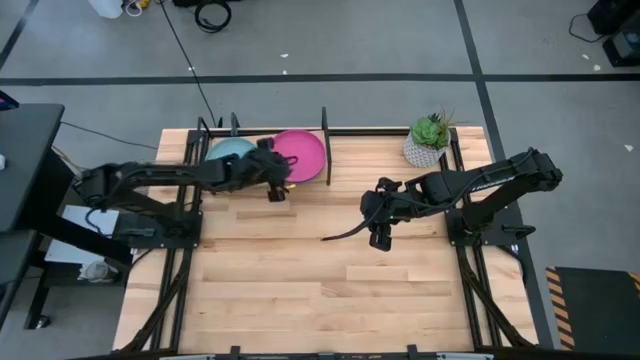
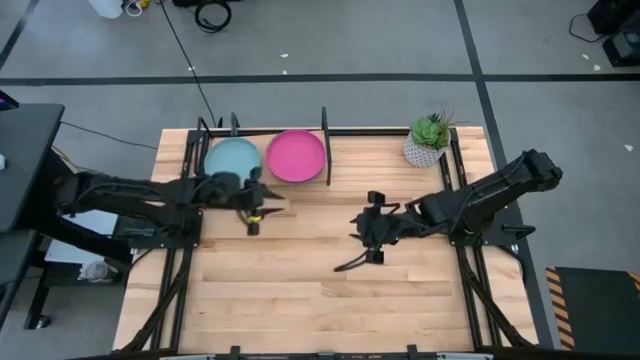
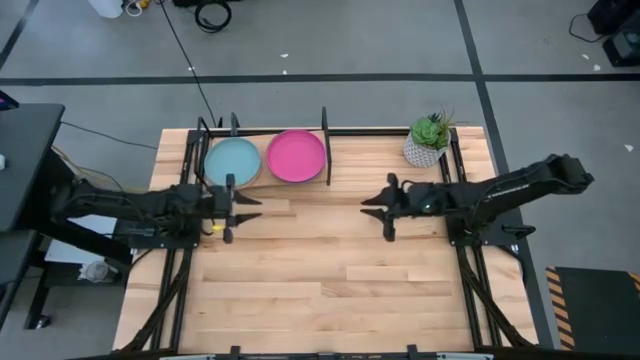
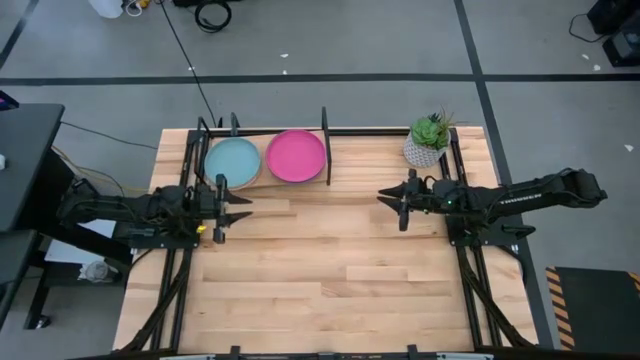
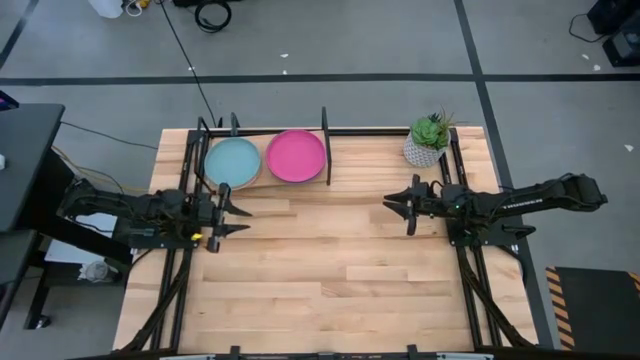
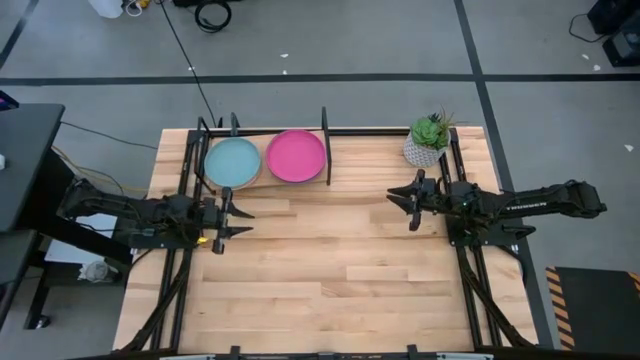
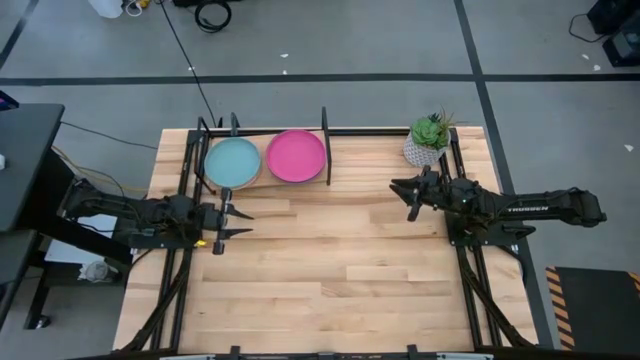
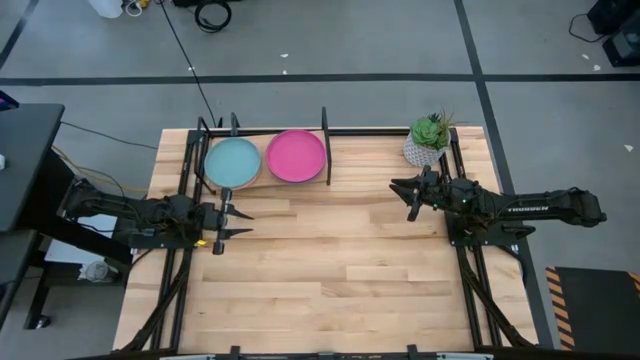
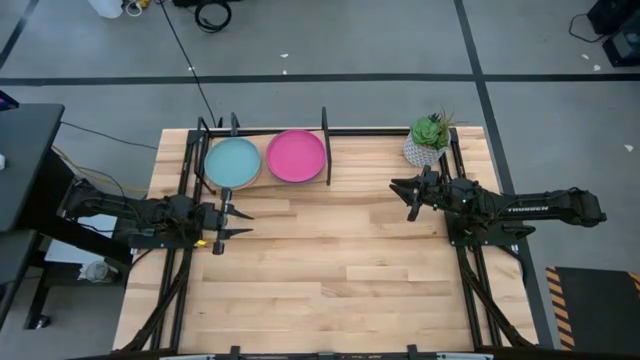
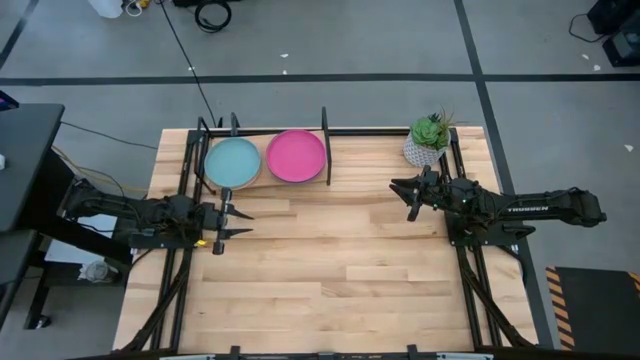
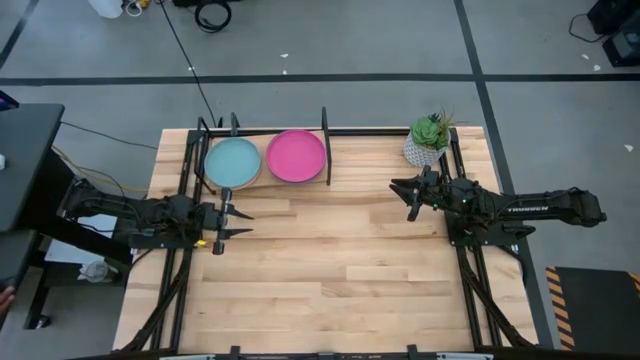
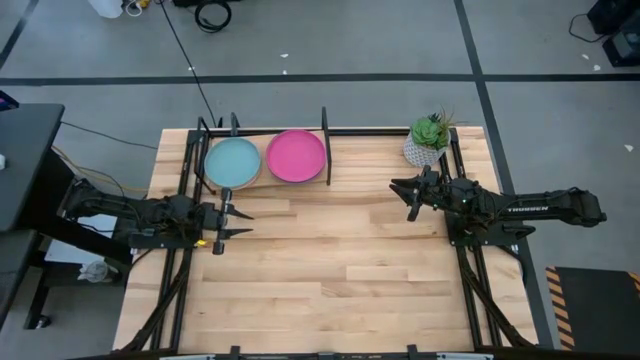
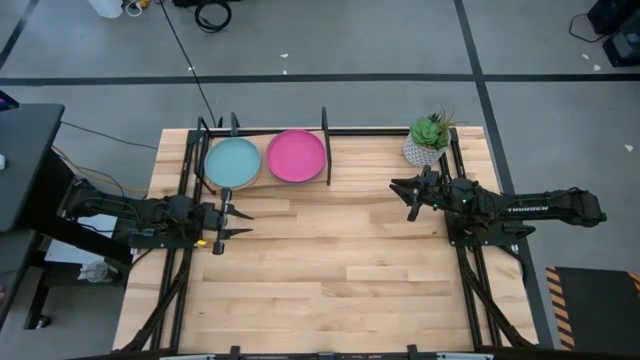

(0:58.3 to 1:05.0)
Task: Place and stack plates onto a shelf
Return to Home Position

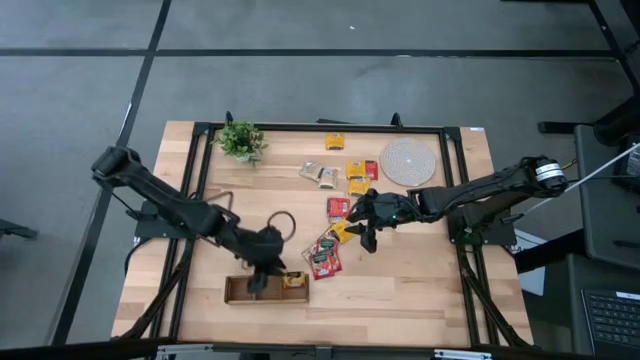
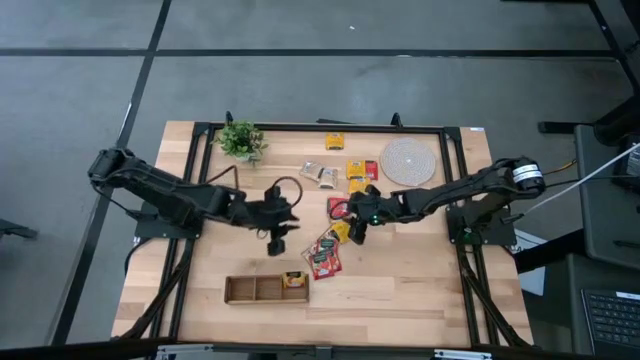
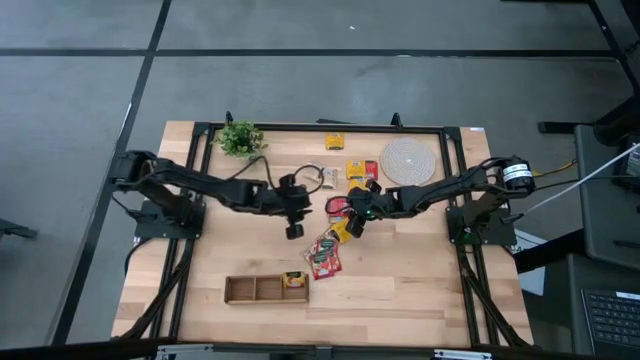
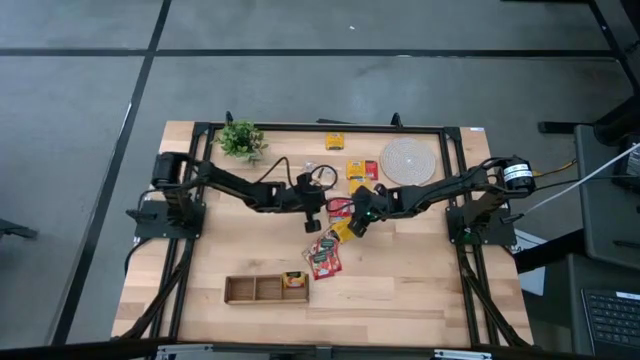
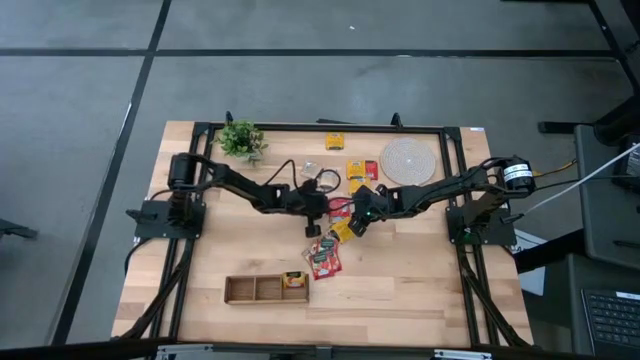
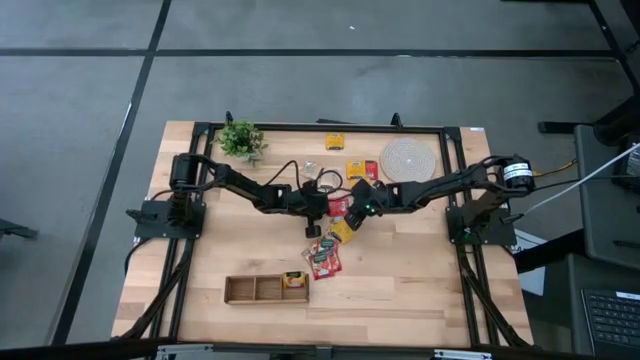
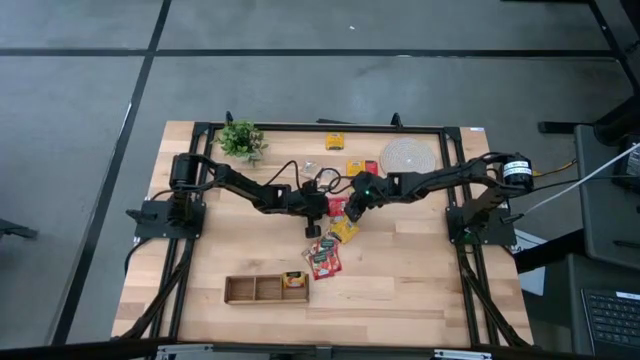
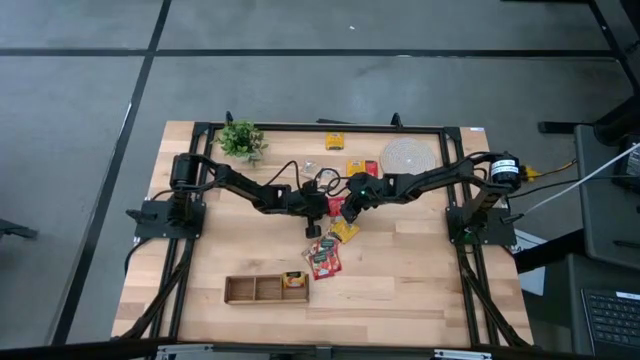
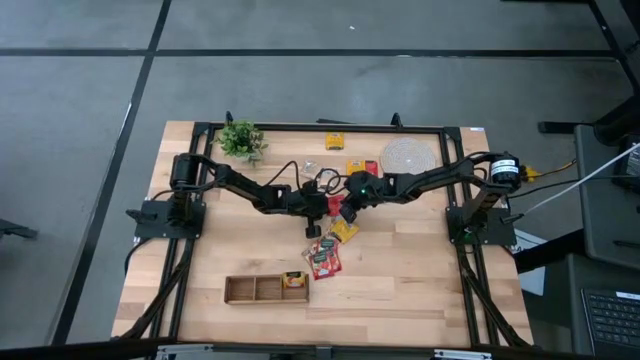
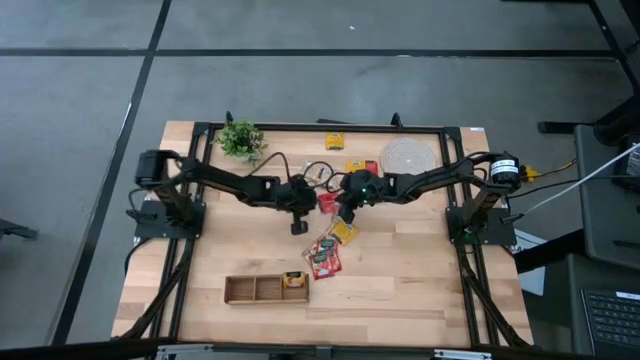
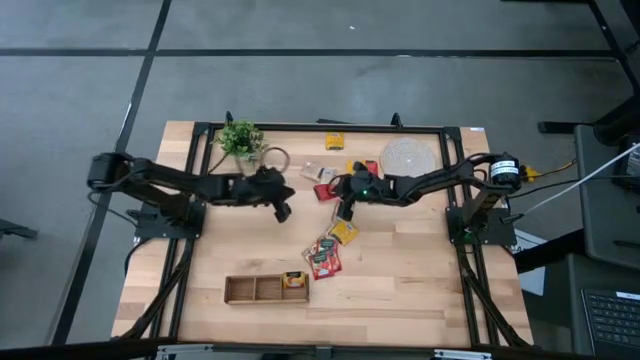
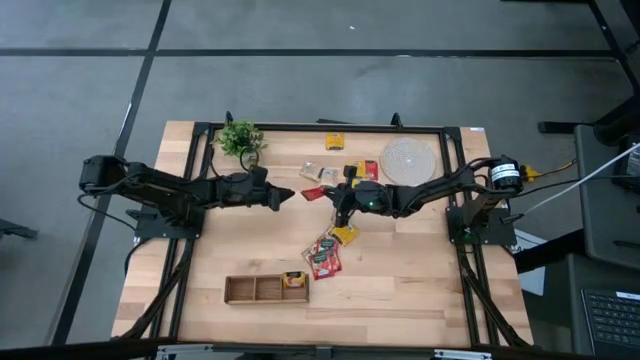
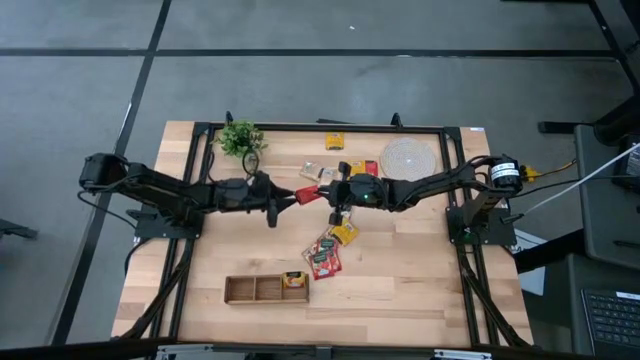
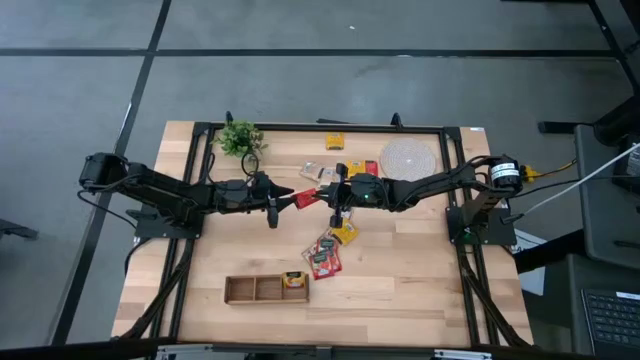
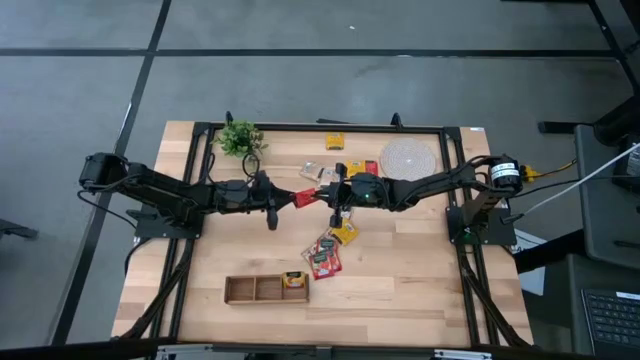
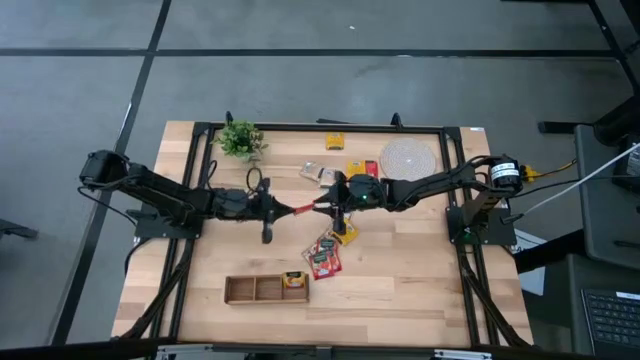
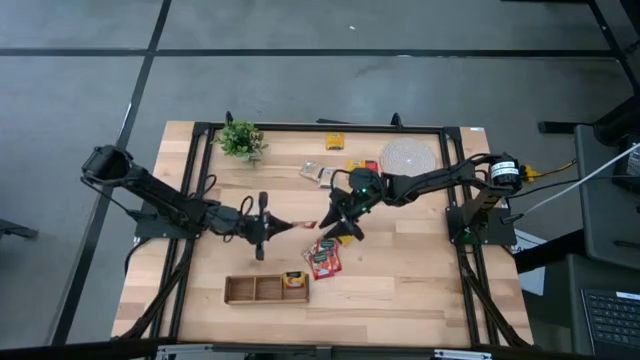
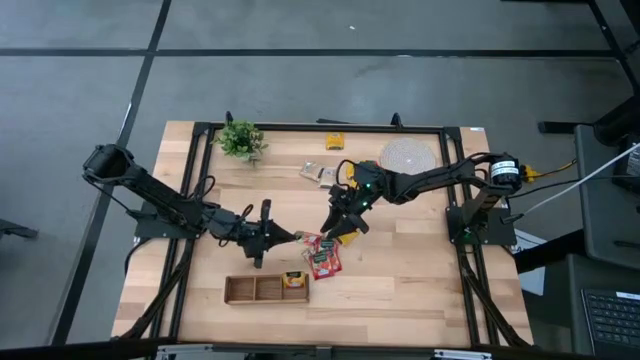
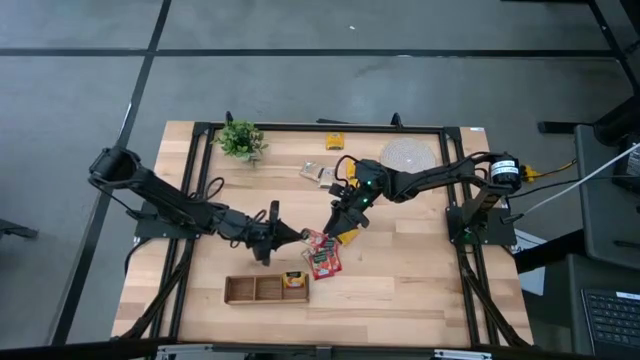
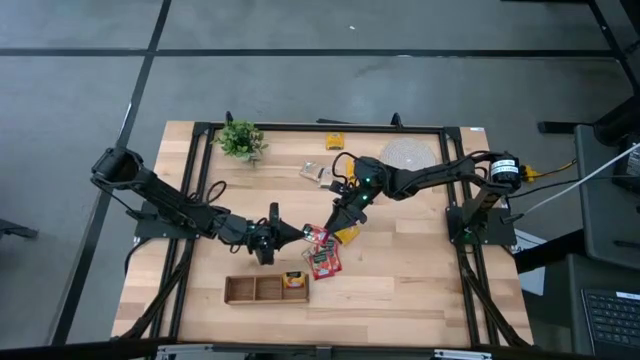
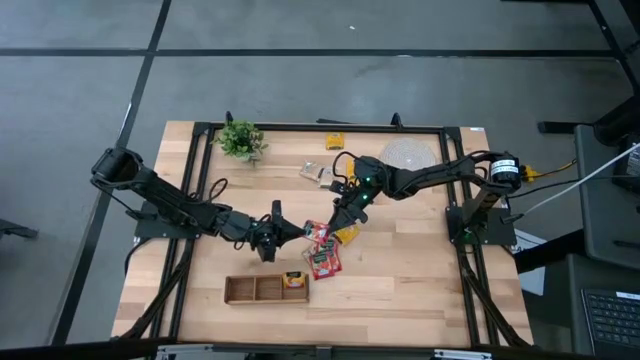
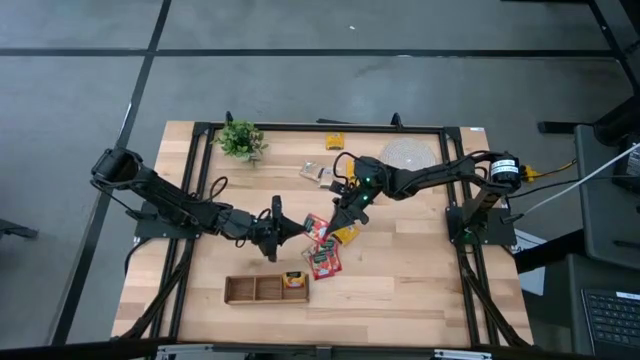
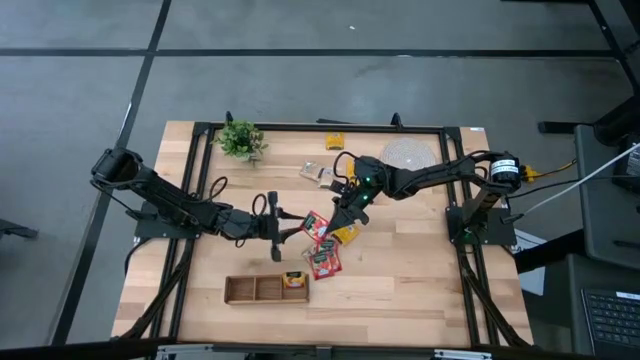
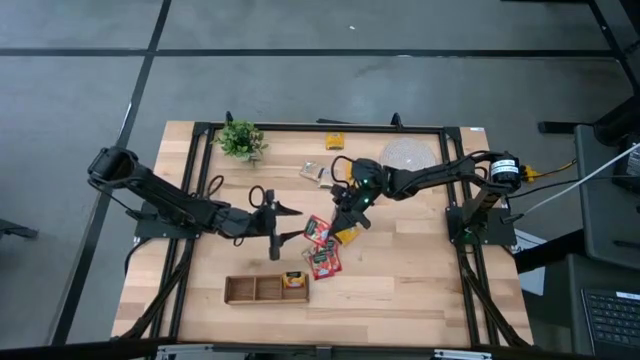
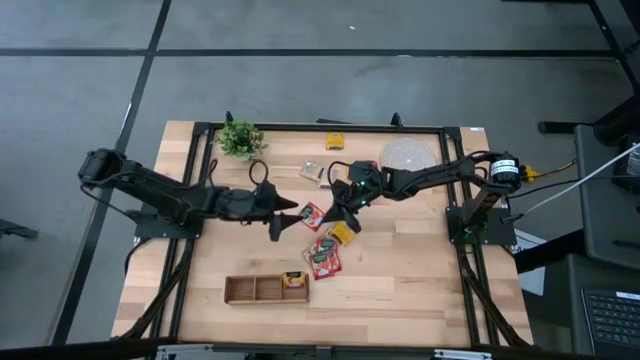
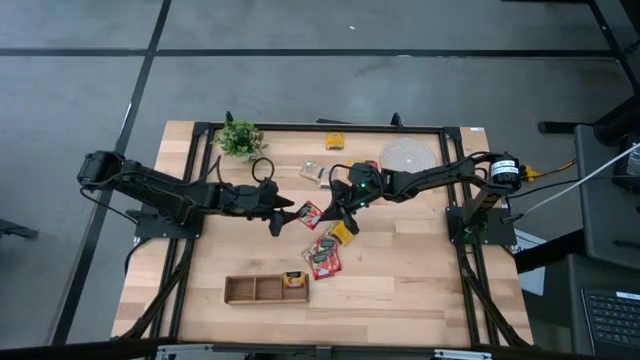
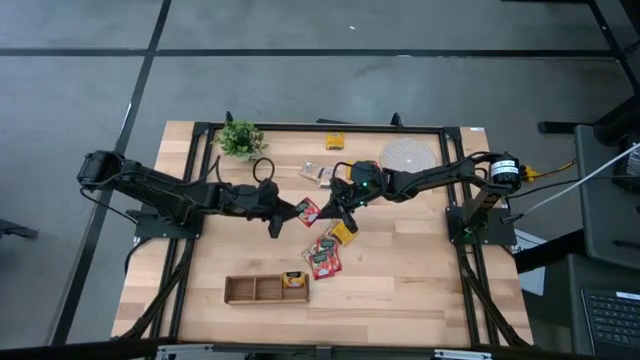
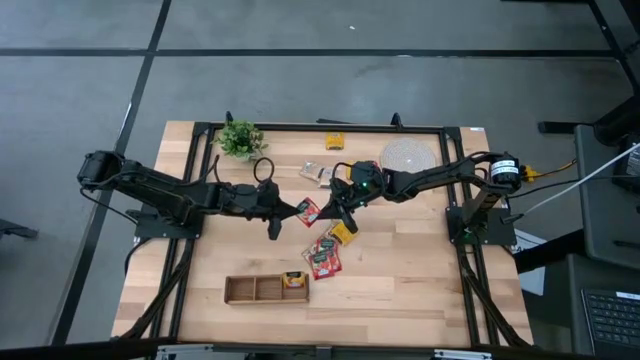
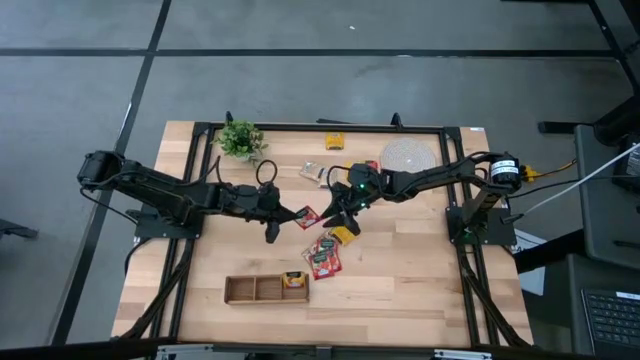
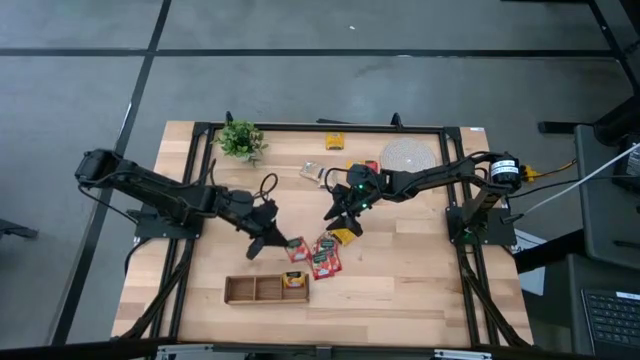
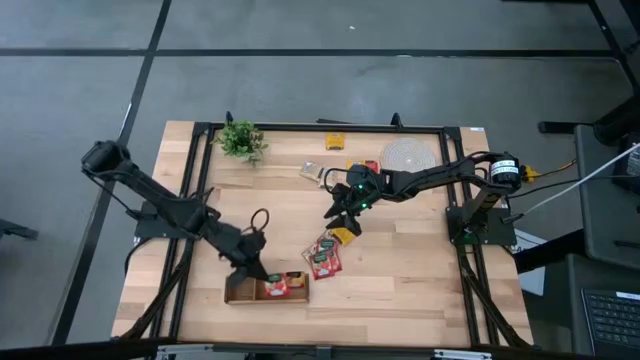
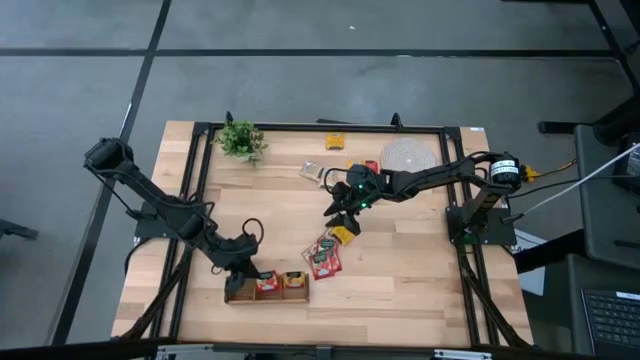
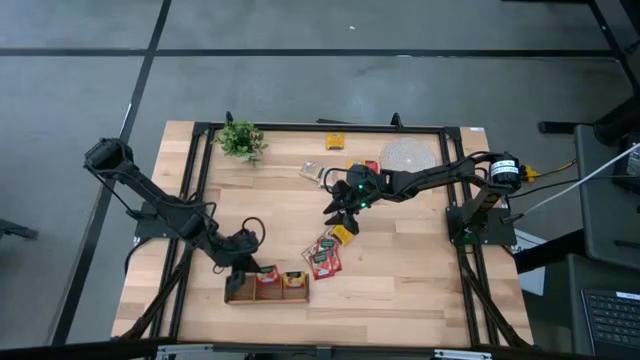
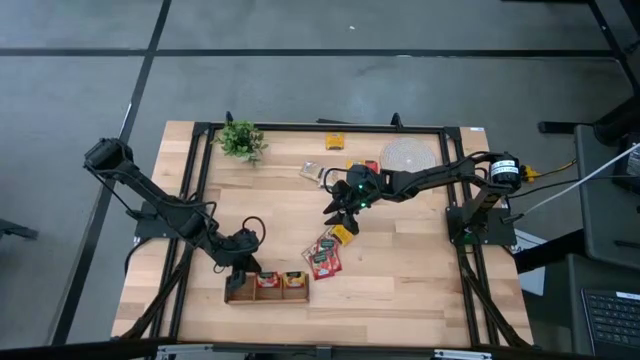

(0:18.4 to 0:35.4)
Task: Pick & Place Tea
Put the red tea bag into the middle section of the wooden organizer
